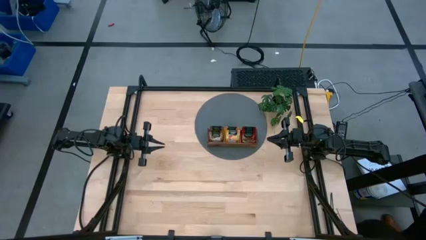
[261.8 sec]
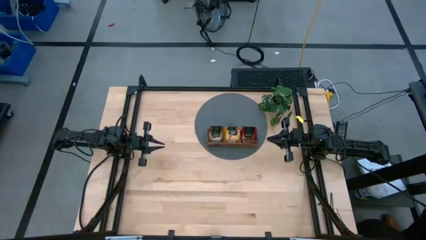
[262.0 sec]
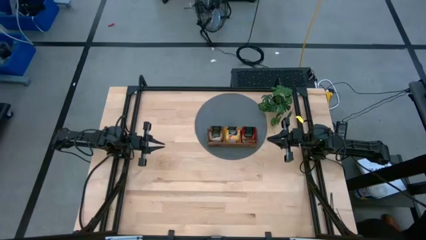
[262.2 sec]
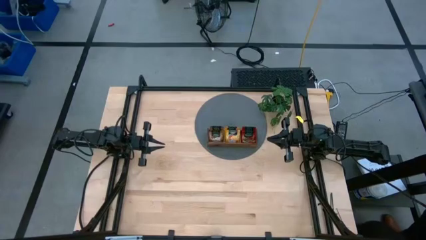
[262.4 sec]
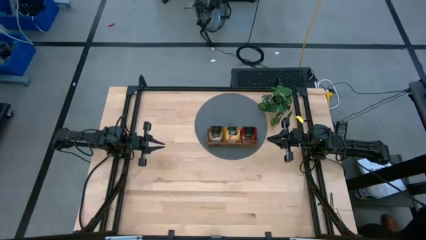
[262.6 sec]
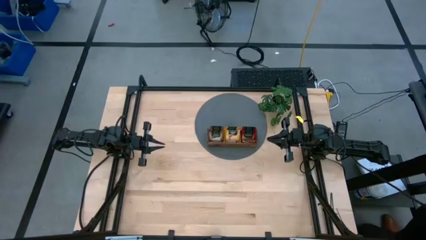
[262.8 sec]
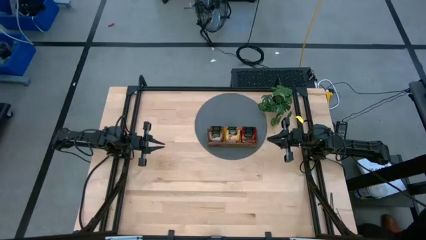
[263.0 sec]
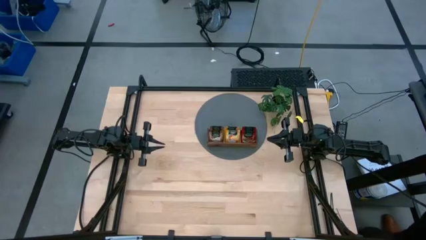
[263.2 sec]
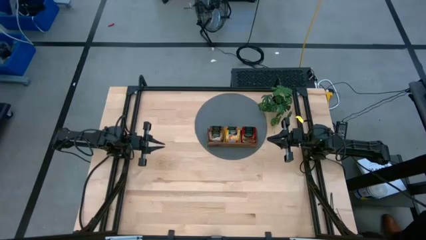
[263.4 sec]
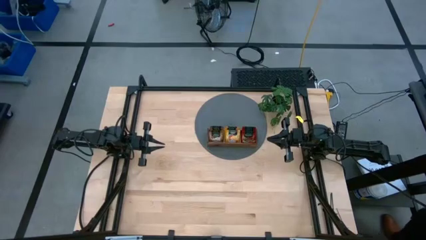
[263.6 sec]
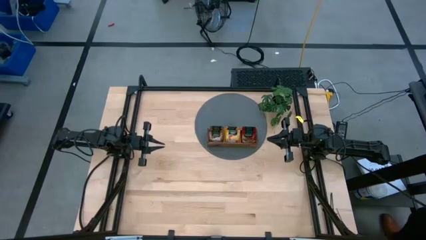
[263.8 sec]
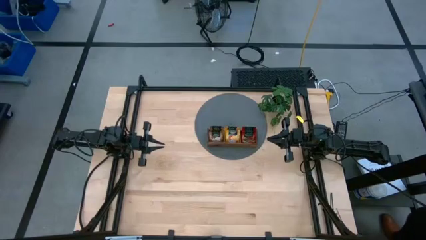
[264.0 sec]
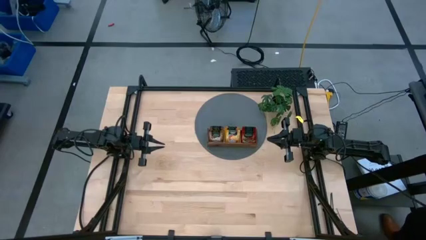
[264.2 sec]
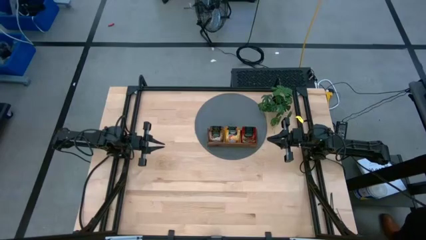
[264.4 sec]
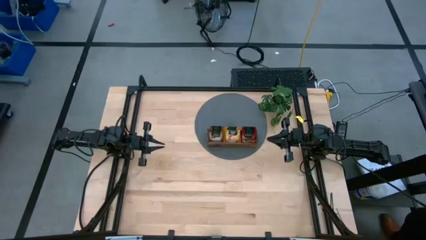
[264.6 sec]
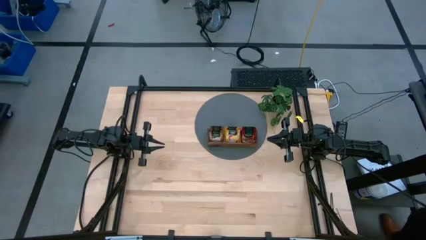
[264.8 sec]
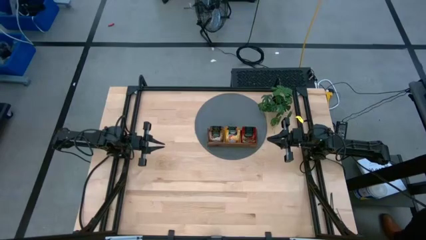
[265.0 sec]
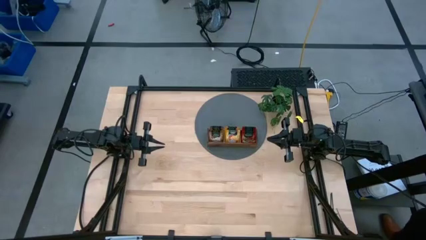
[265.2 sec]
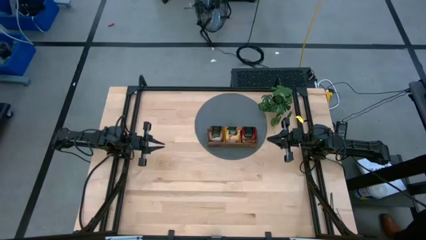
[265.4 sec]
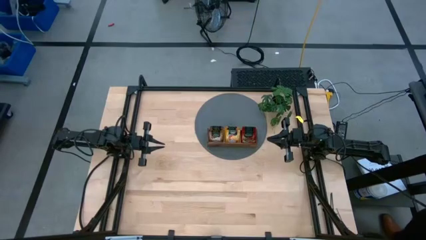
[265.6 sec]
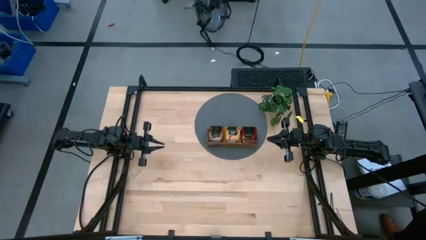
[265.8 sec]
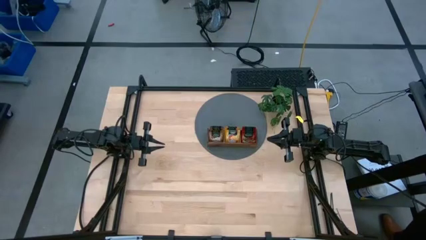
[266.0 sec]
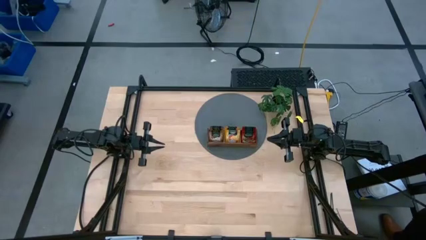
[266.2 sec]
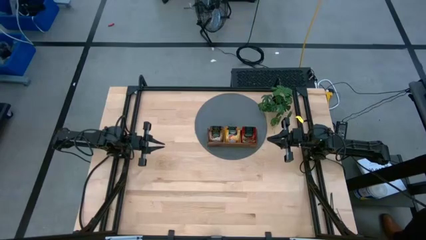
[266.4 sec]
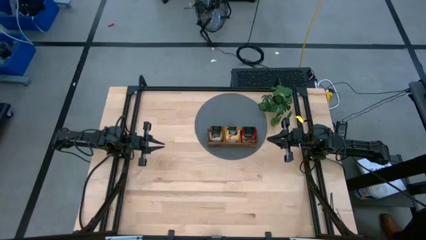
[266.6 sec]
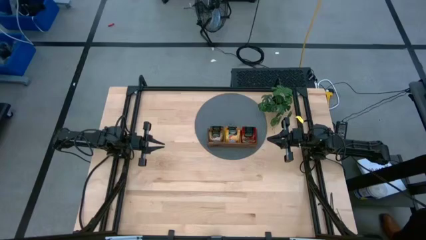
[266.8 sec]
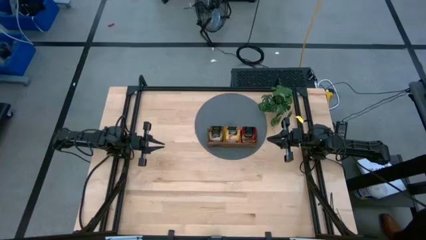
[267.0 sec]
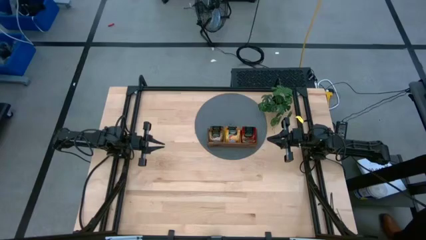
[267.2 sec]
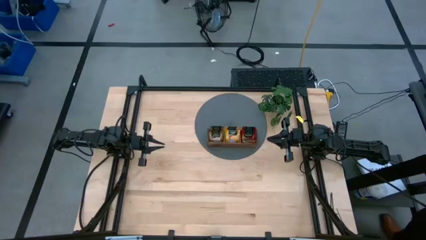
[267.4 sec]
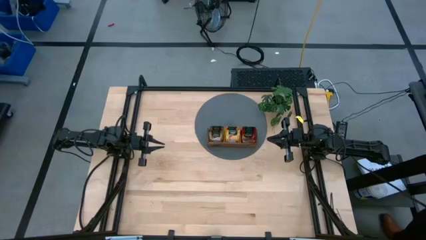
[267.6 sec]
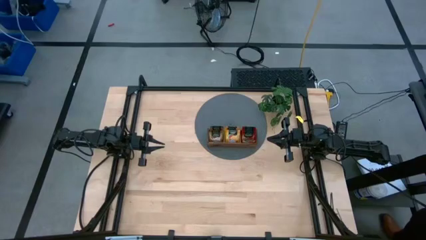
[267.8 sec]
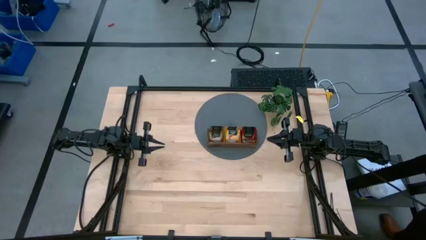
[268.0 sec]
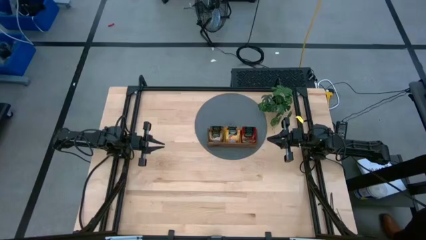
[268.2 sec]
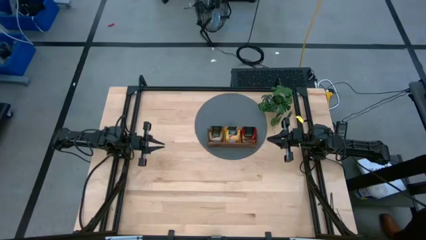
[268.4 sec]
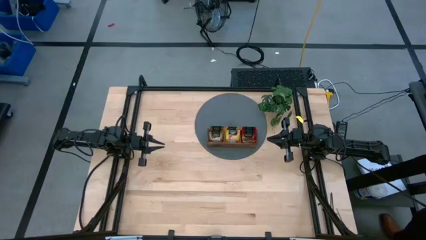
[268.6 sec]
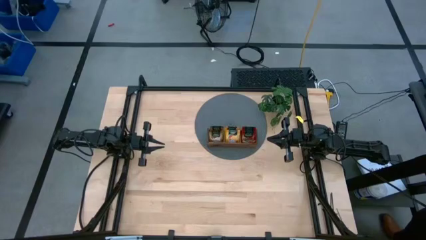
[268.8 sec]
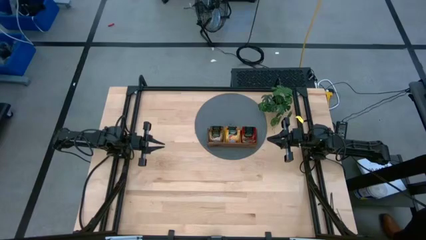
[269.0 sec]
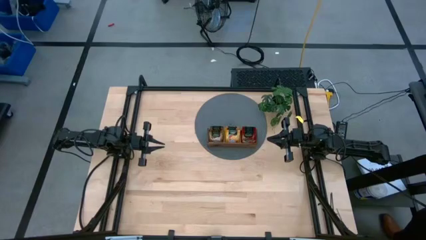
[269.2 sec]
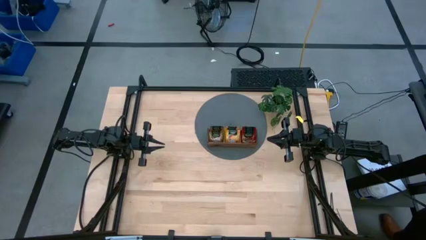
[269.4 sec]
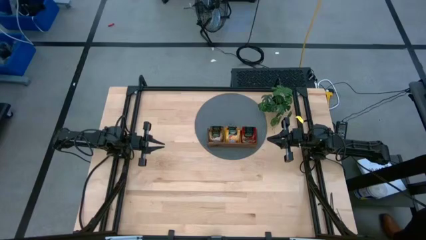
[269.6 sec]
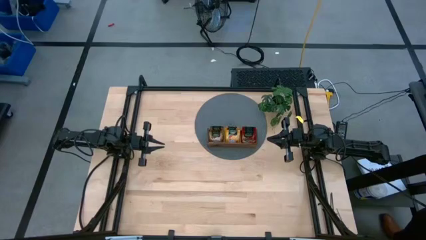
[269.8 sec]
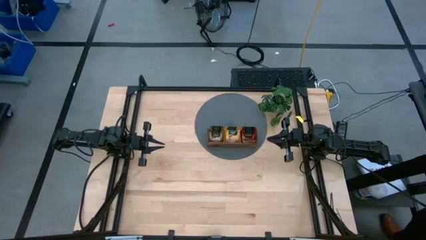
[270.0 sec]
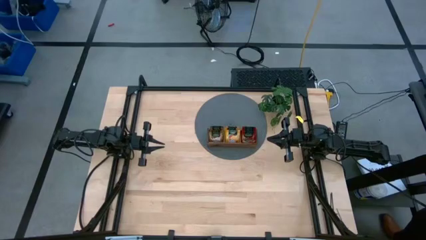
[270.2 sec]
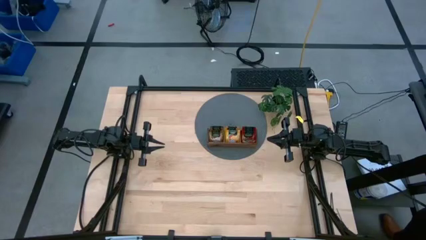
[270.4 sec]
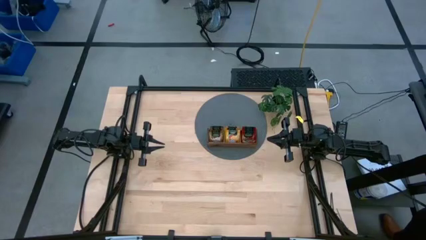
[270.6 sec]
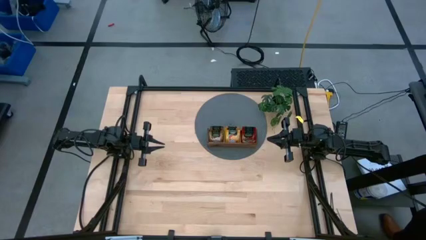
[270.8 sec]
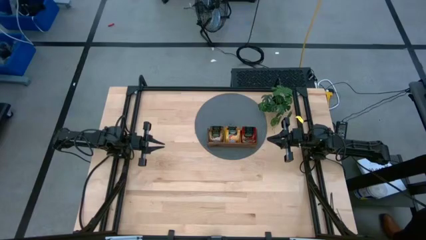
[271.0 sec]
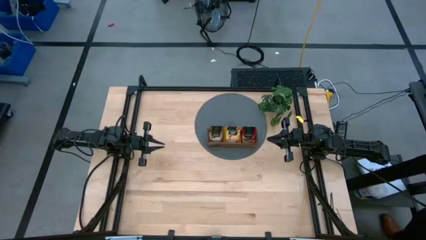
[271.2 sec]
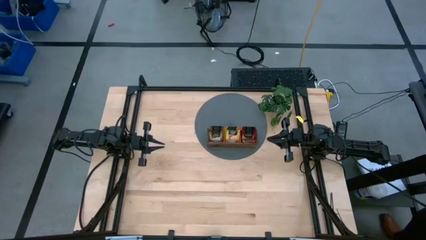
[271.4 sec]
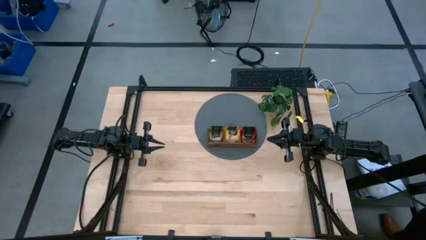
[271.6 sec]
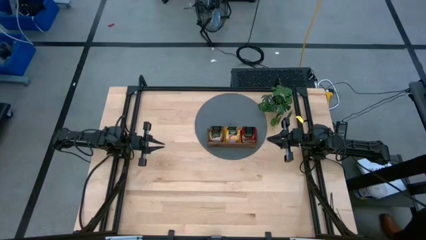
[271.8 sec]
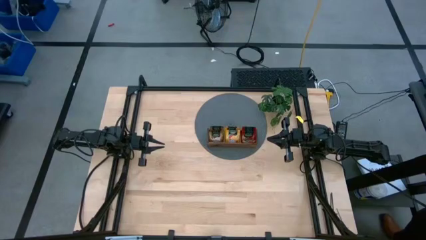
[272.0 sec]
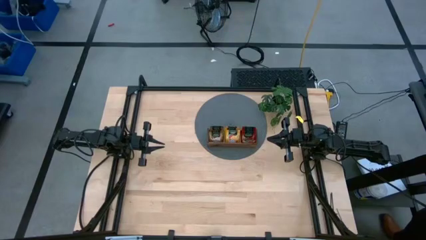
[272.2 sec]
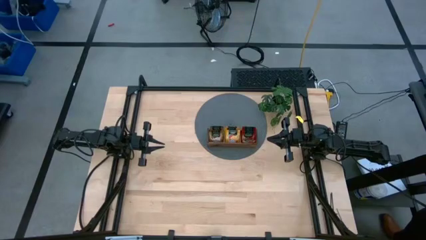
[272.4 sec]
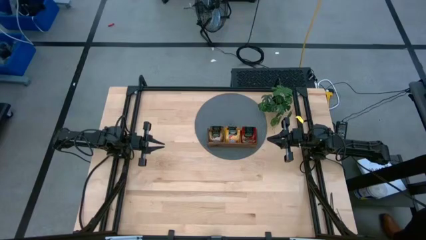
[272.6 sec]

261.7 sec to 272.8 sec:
Task: Pick & Place Tea
Return to Home Position
